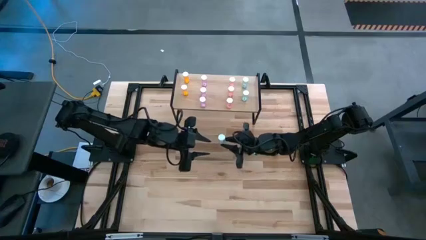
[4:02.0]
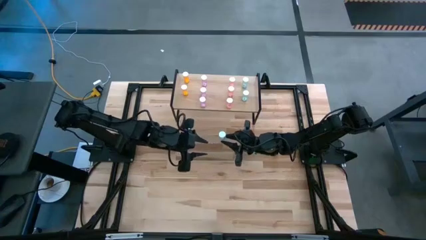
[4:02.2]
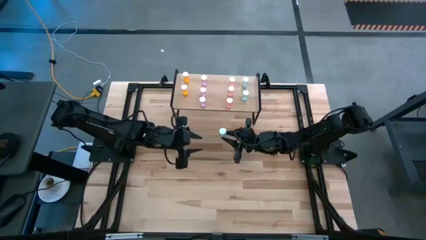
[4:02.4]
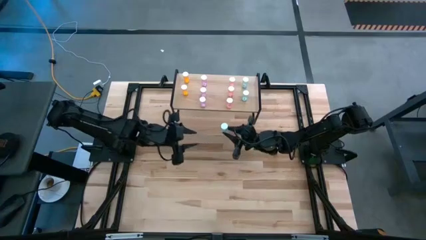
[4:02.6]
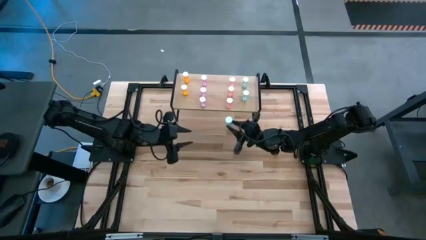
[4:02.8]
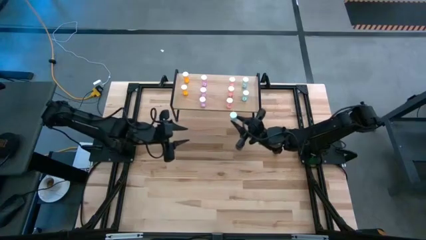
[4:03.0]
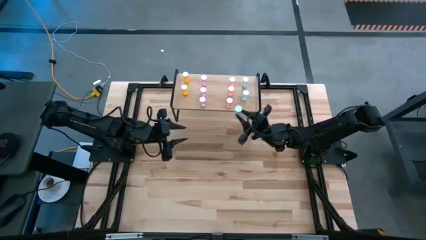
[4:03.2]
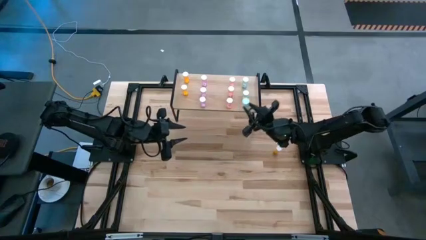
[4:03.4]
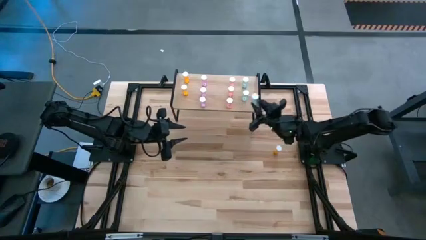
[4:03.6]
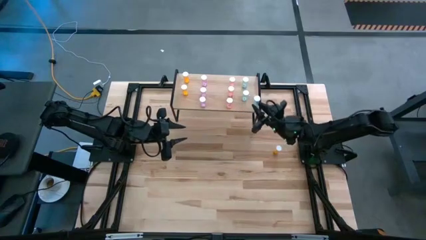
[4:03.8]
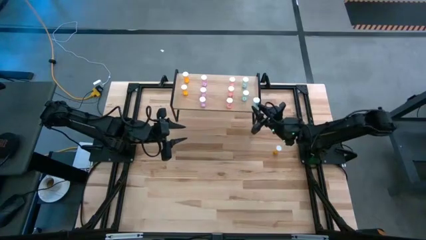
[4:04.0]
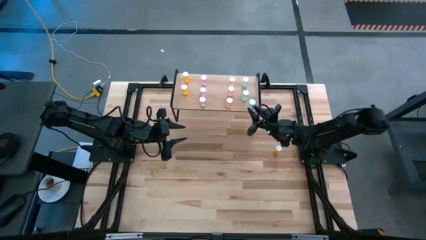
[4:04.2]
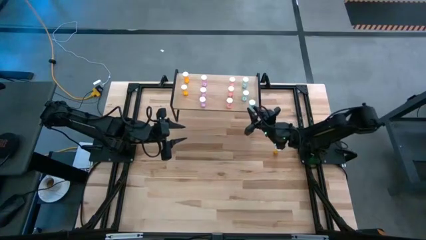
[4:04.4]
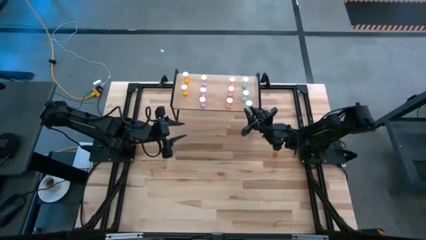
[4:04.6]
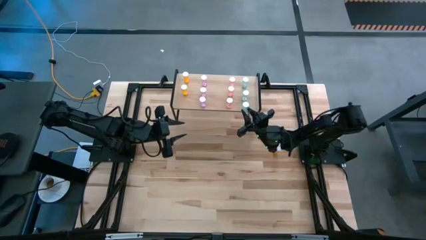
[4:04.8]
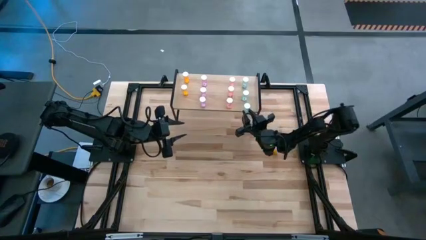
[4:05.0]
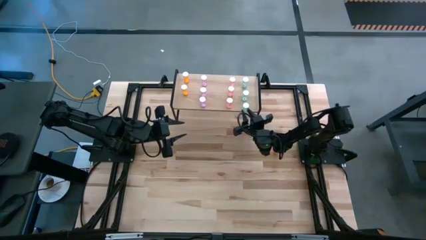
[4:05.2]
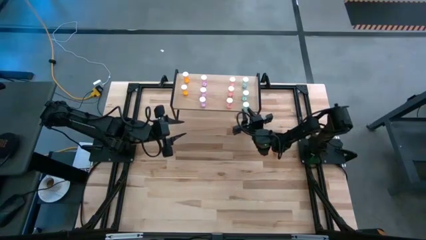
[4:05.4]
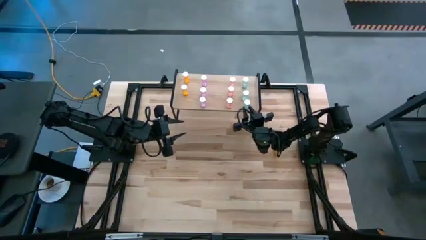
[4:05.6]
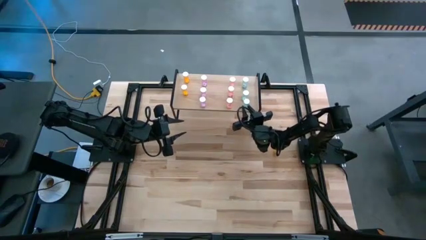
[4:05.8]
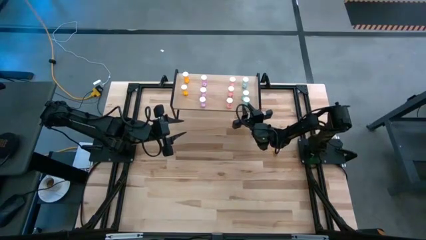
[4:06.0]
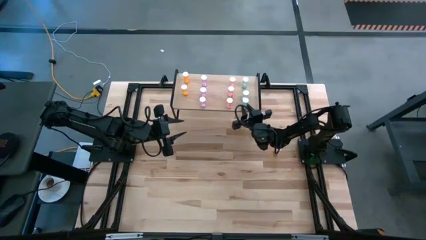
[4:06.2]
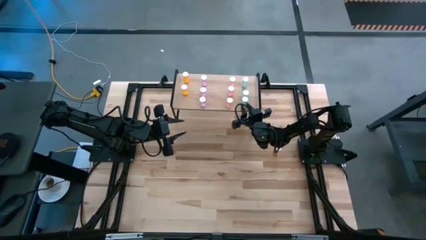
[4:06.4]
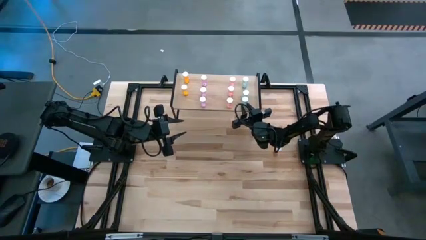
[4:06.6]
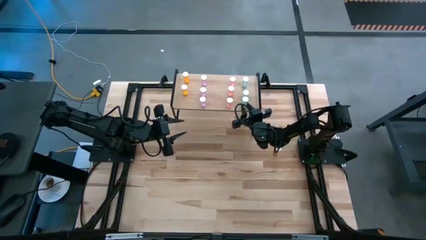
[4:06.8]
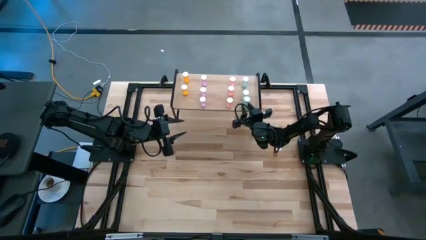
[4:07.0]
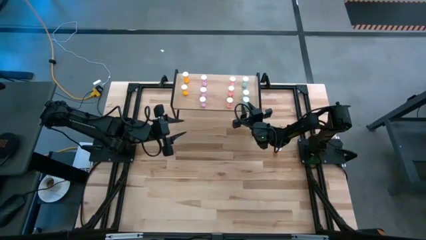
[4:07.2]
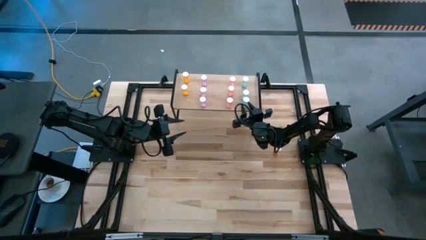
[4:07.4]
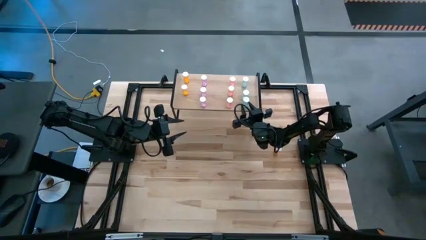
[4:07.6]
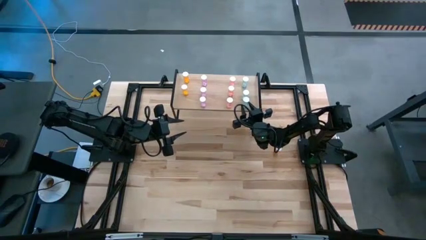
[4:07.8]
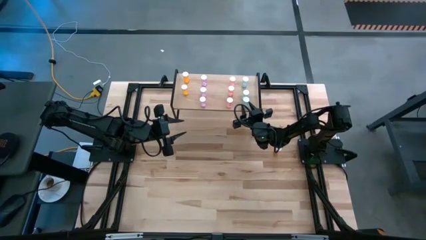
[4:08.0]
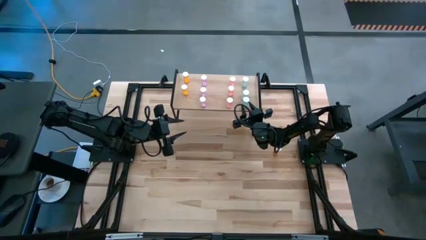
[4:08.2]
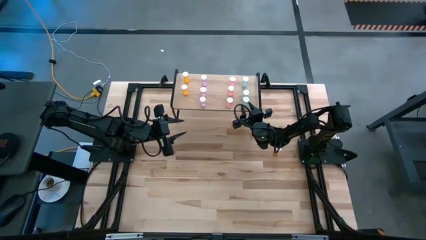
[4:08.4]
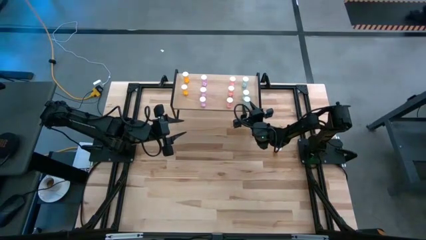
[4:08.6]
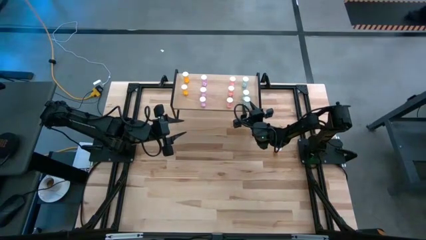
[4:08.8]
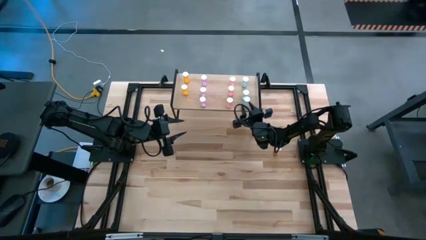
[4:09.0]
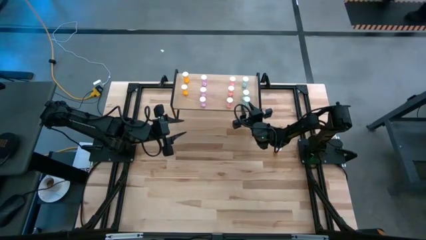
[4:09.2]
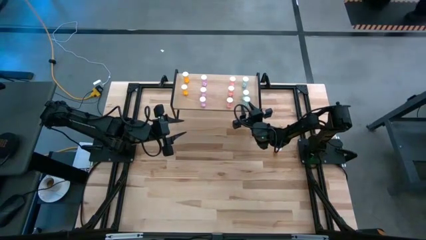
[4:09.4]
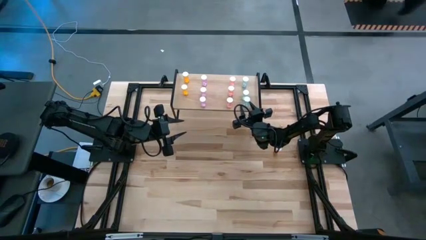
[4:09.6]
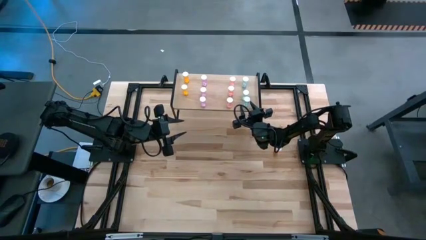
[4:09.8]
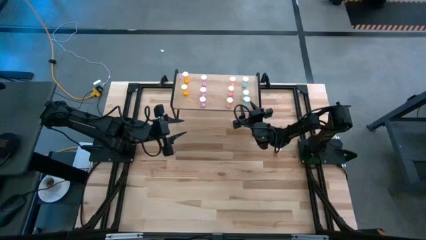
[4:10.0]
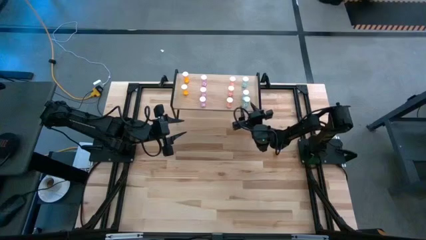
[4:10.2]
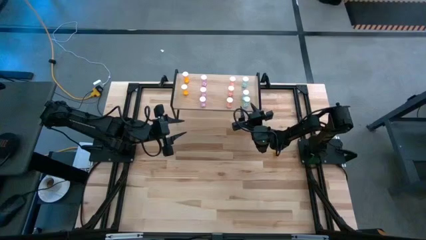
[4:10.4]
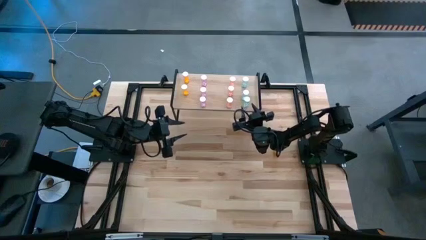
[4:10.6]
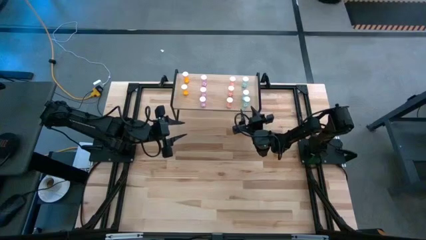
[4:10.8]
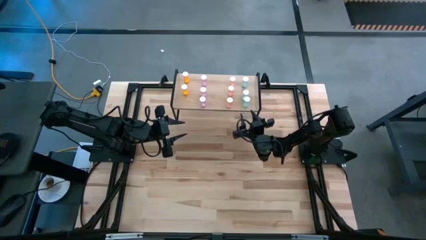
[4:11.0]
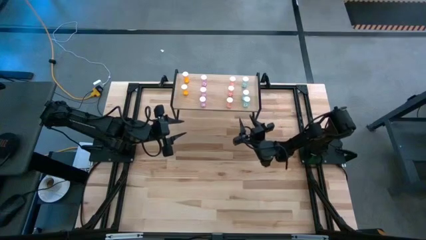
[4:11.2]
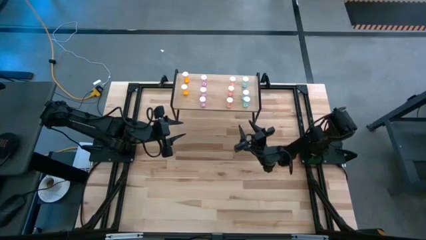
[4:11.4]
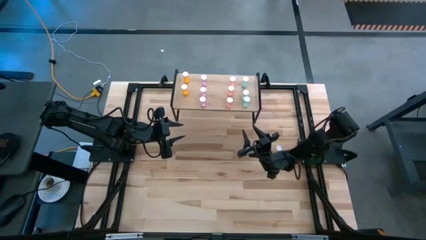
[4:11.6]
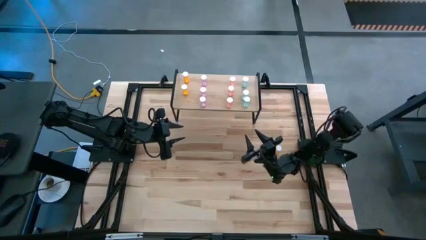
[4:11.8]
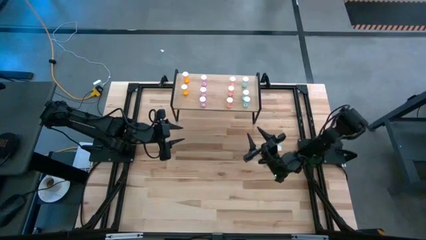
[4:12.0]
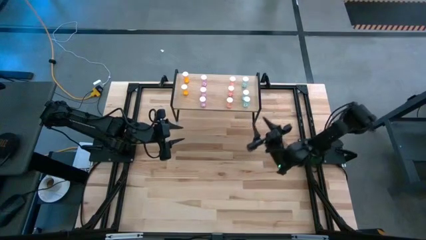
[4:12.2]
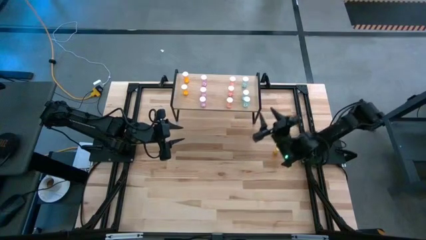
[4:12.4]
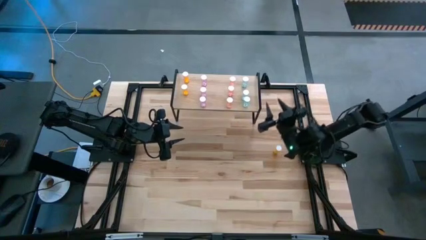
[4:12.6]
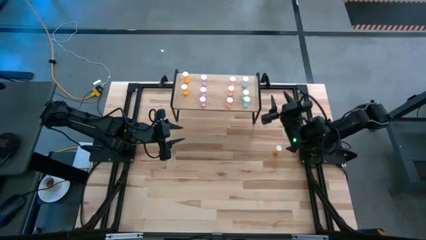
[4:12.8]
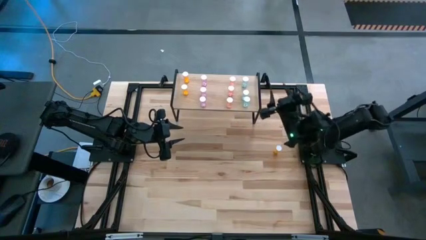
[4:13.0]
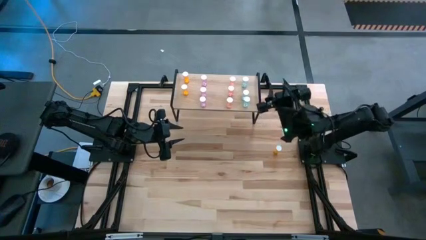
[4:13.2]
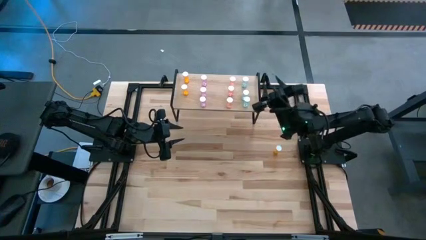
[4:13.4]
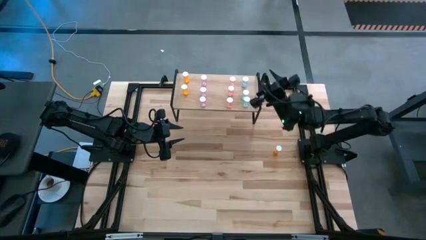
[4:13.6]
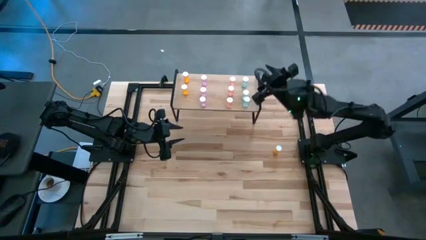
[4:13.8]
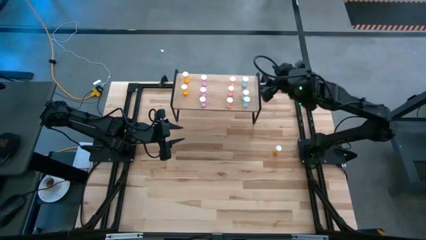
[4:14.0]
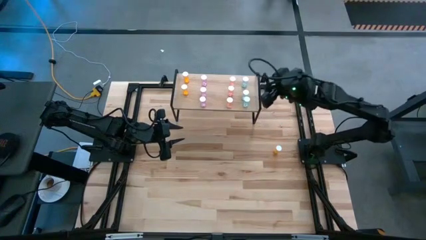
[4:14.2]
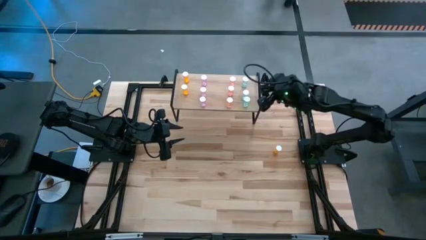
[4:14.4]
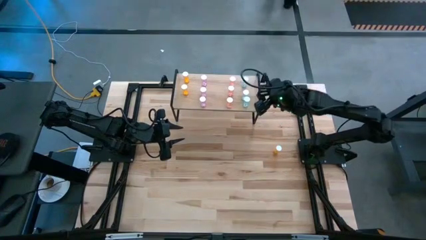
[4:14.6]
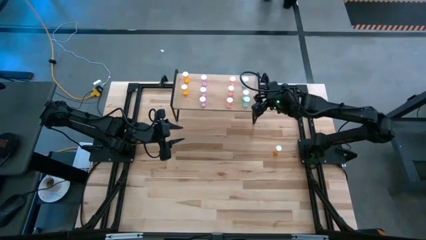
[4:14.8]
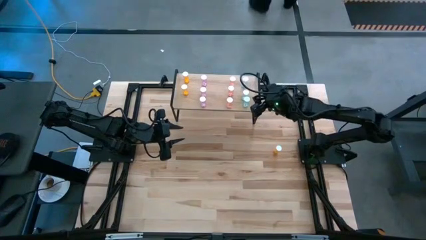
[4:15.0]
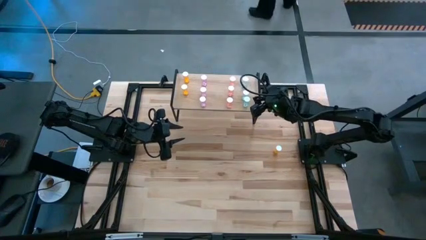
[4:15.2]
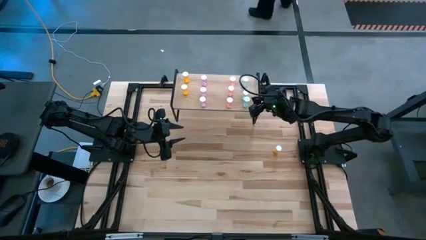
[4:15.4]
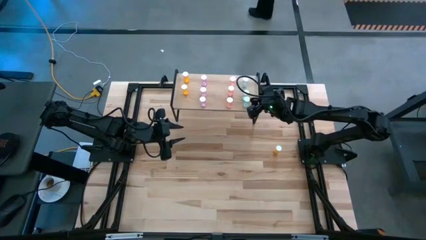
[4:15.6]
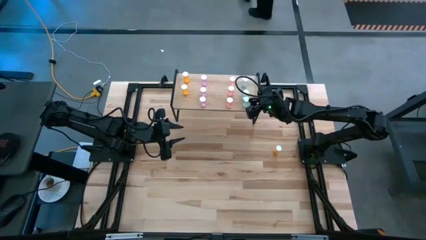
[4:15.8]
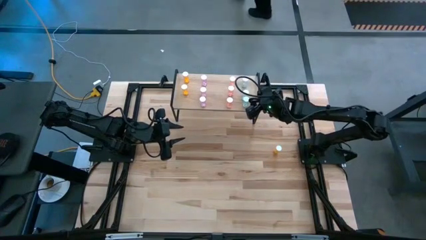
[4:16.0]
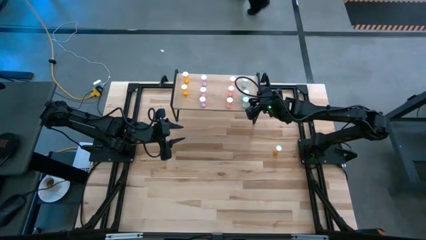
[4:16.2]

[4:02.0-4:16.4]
Task: Pick and place medicine bottles onto shelf by color
Put the blue pill bottle on the shelf aligned with other blue pill bottles
